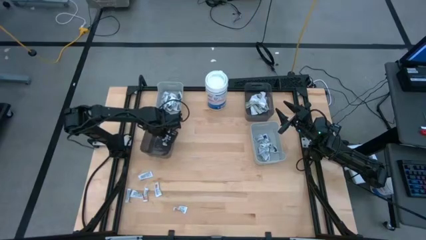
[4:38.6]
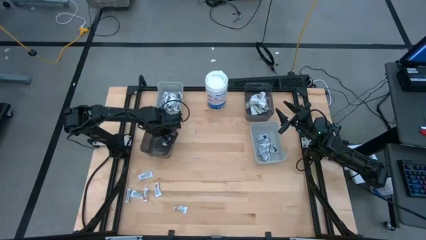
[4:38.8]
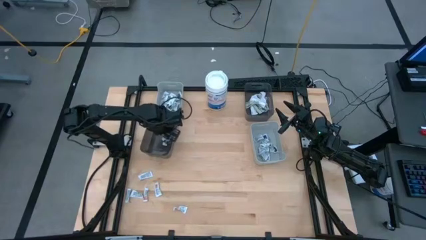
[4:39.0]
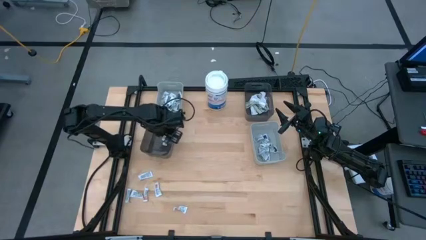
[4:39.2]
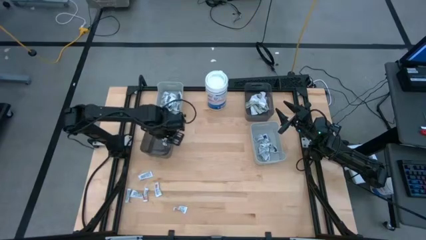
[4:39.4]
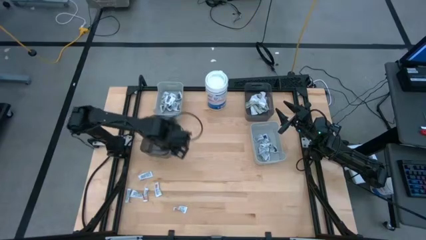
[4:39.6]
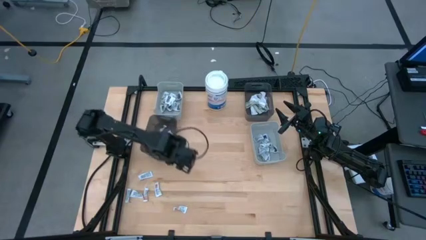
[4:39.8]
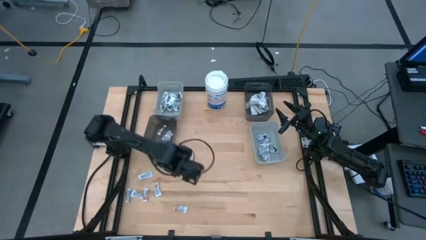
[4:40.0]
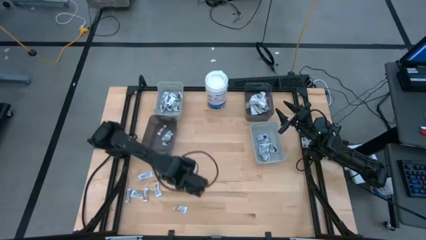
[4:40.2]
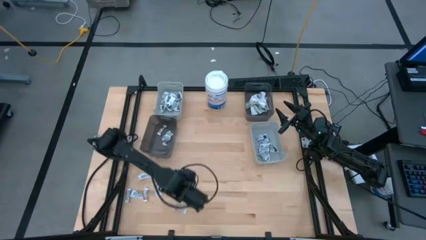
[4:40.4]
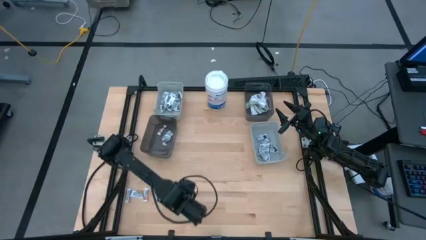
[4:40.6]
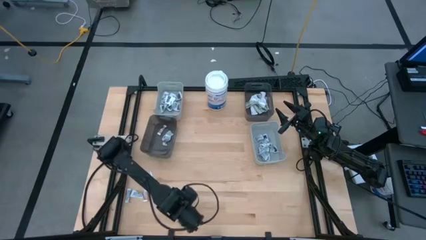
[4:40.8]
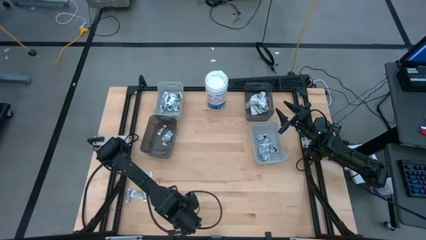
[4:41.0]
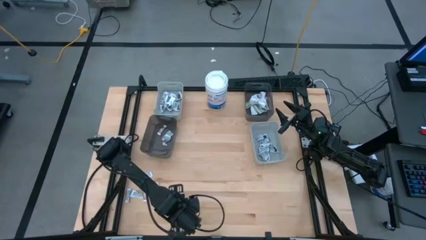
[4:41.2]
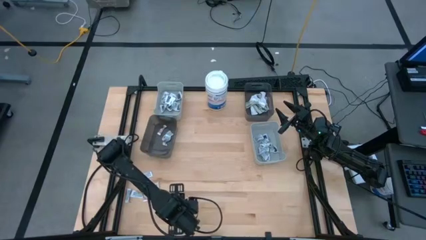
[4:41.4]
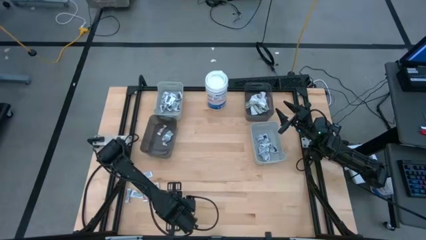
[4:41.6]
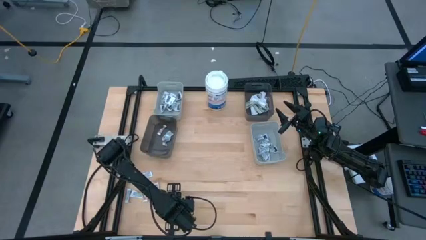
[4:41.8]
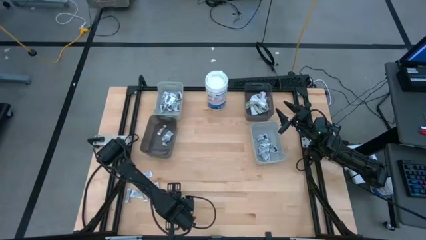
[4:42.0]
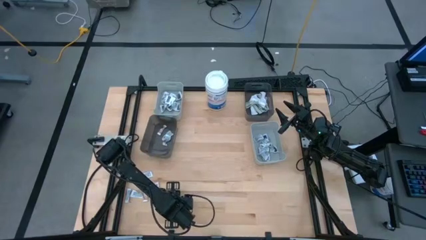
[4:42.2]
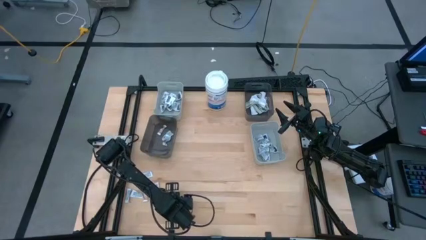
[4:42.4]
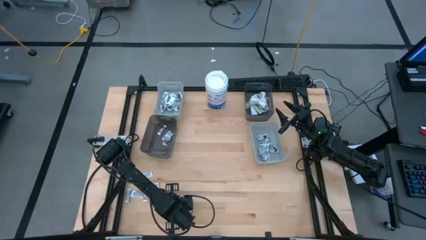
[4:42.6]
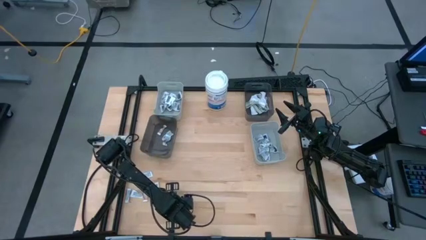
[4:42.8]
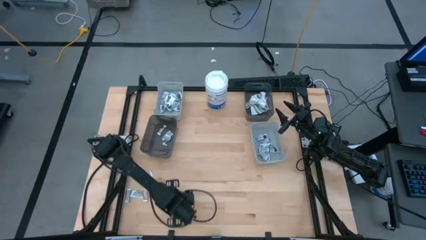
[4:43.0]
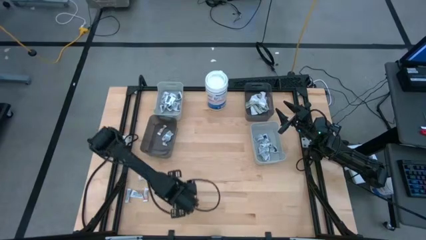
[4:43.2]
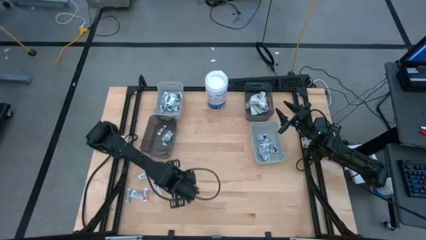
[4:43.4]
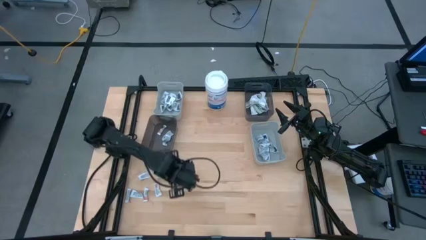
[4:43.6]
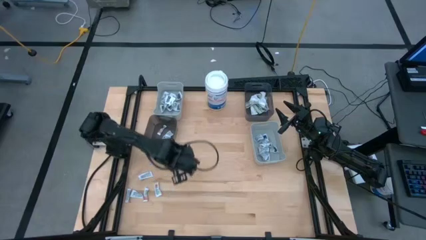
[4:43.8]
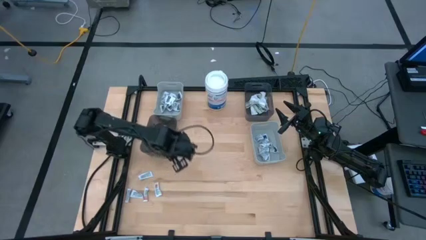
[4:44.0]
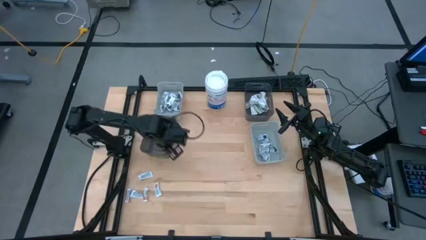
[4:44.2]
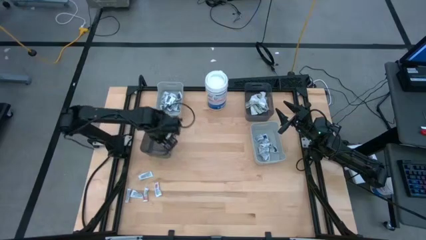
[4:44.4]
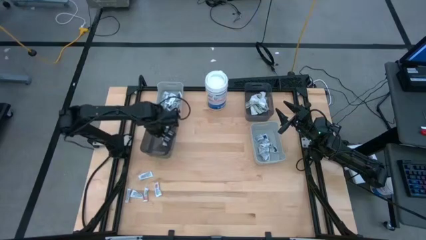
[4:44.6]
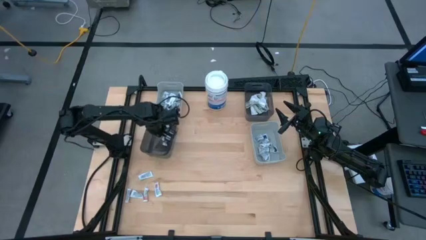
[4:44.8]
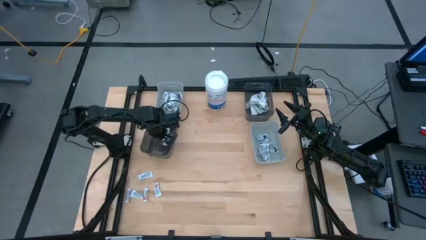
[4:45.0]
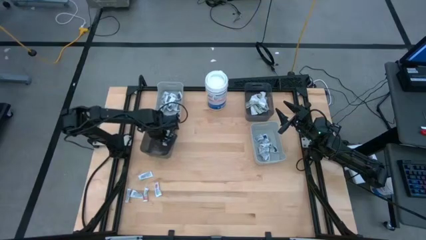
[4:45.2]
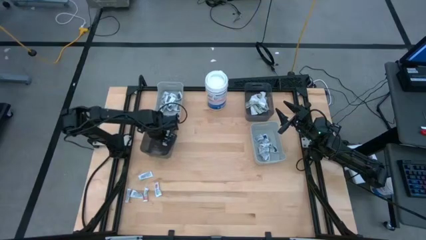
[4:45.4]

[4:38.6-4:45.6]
Task: Pick & Place First Aid Supplies
Put the orange ointment pack into the left black bin

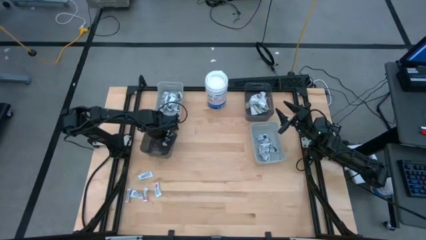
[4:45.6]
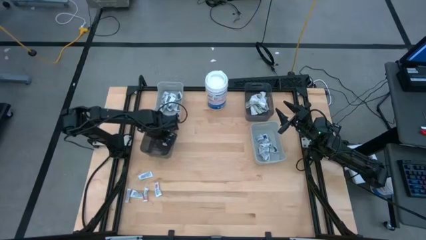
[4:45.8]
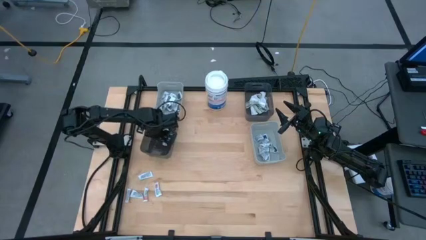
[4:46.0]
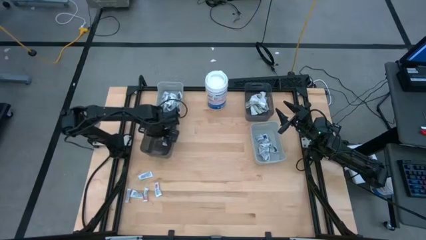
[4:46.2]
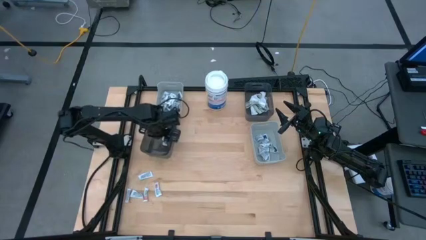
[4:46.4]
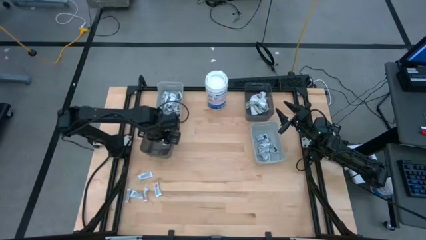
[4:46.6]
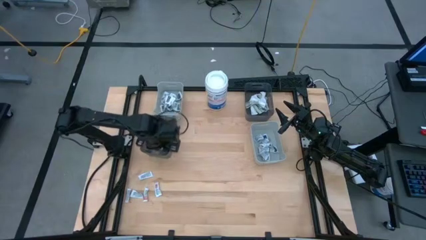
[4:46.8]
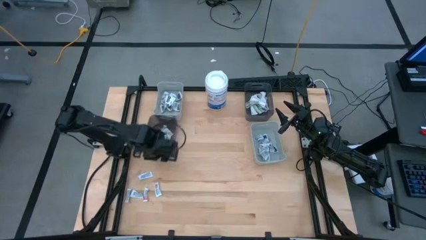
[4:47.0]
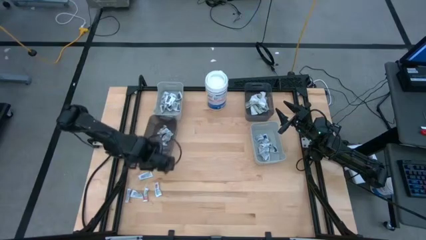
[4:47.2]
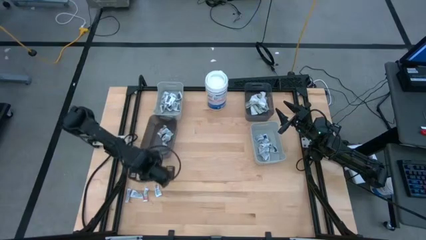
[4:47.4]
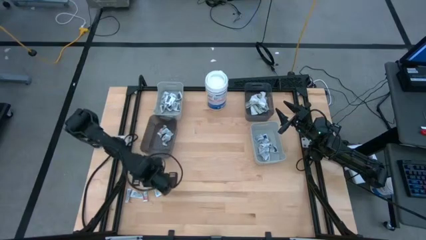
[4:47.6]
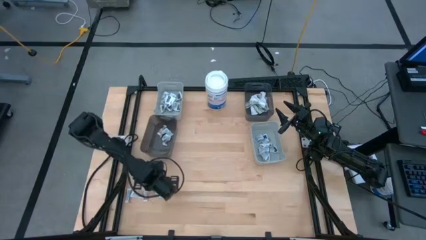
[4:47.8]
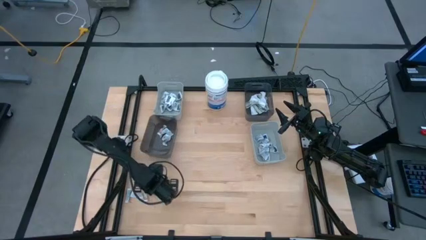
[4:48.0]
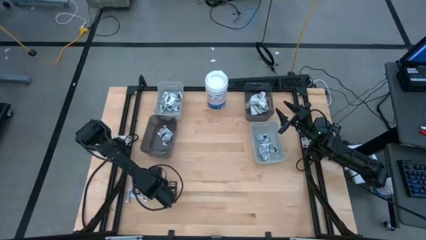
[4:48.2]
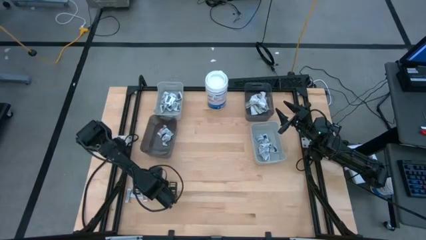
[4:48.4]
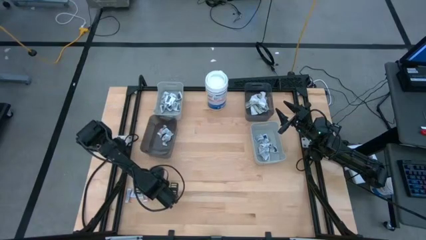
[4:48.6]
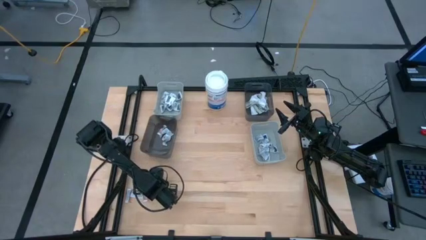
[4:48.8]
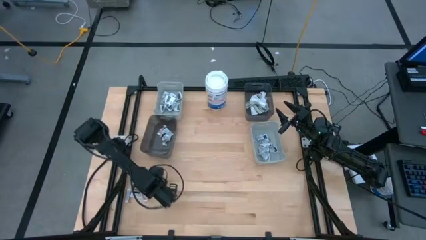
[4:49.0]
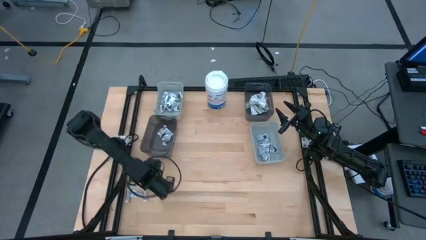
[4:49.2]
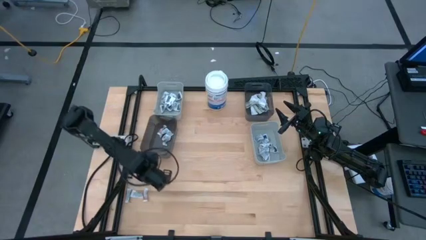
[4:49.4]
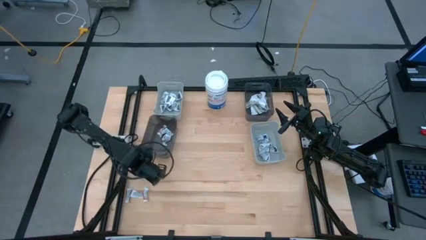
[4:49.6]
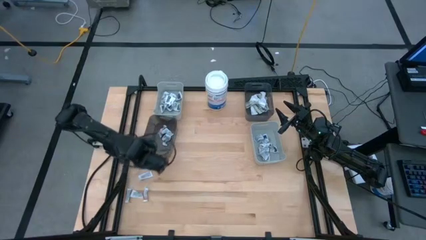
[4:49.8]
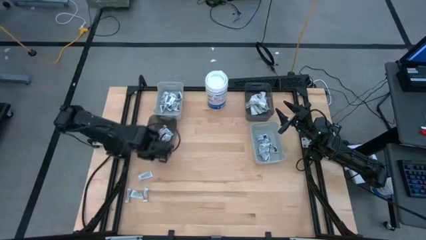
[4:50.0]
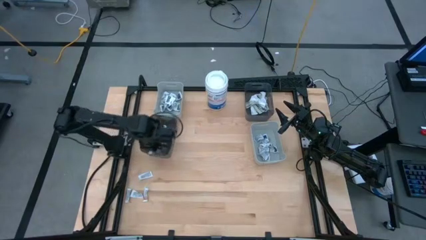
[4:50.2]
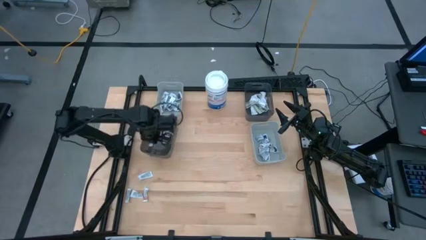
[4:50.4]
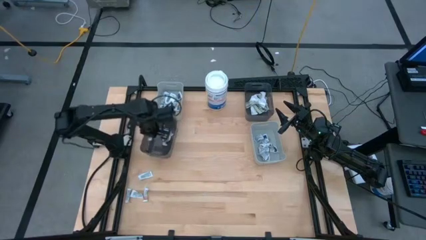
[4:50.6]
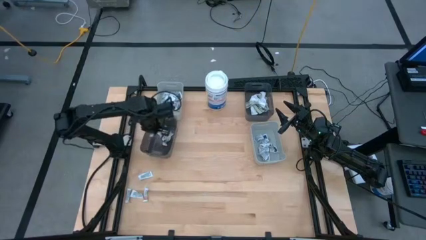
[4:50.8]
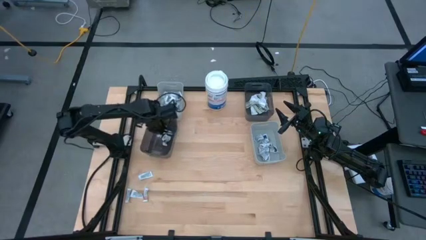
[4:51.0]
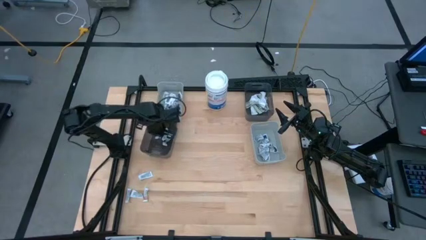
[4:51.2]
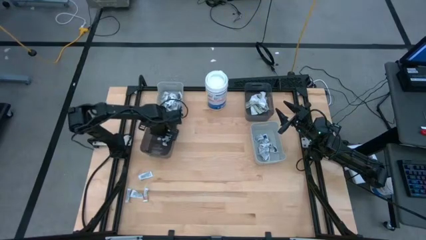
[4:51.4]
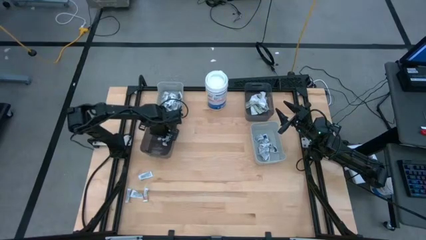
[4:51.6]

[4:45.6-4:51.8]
Put the orange ointment pack into the left black bin

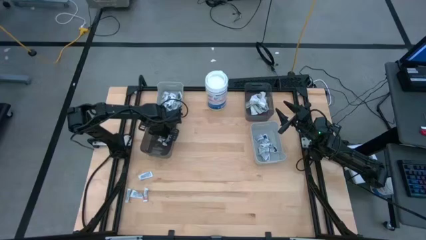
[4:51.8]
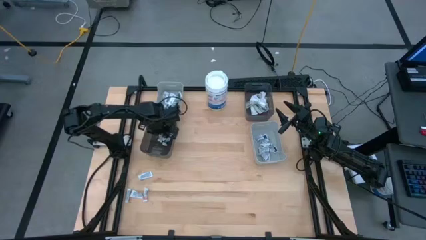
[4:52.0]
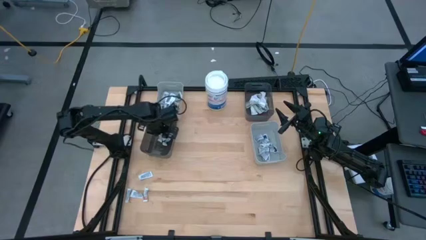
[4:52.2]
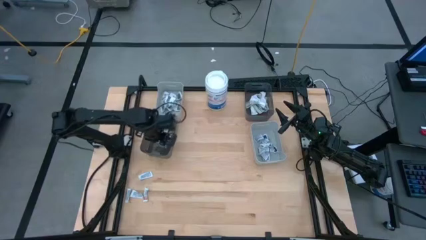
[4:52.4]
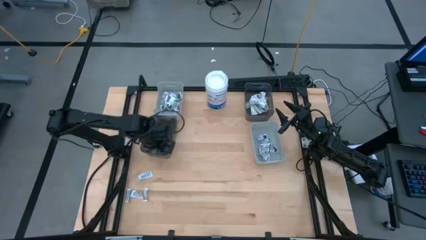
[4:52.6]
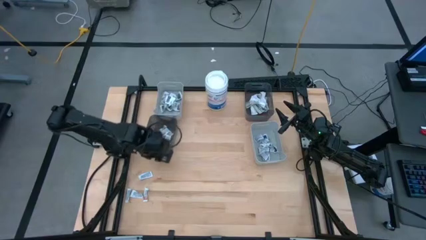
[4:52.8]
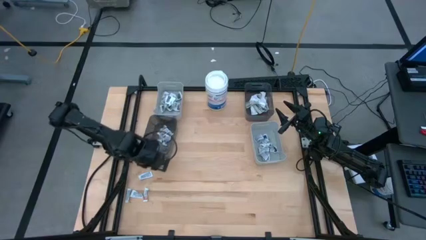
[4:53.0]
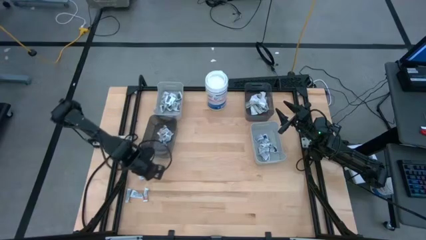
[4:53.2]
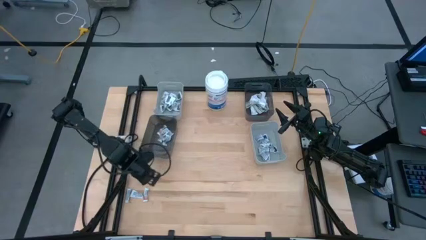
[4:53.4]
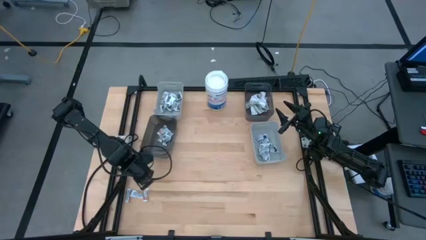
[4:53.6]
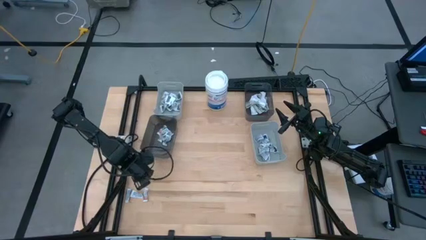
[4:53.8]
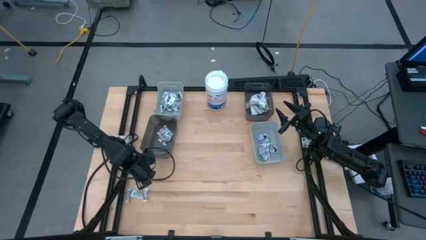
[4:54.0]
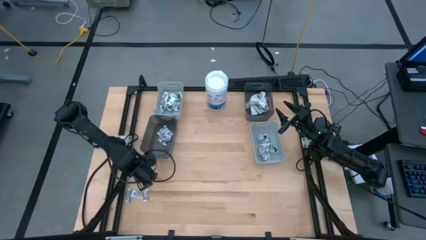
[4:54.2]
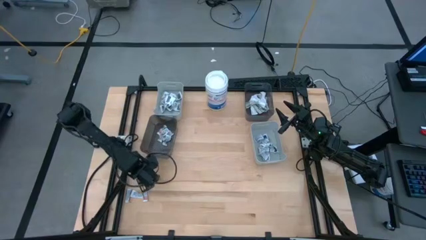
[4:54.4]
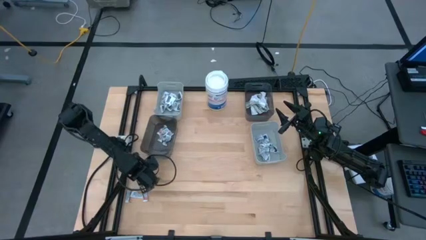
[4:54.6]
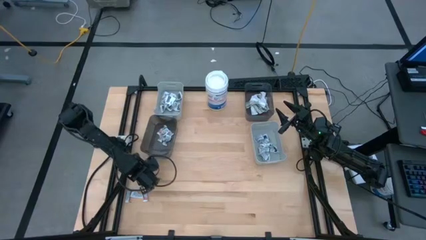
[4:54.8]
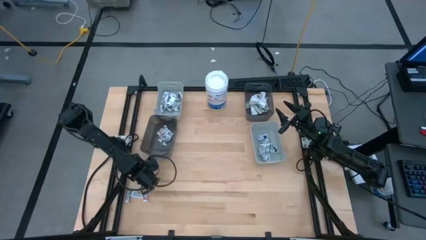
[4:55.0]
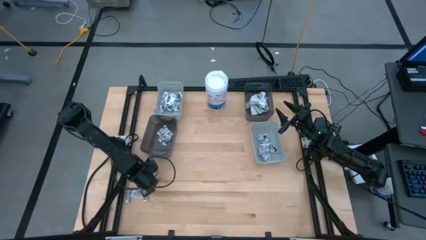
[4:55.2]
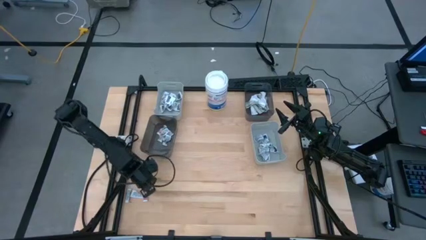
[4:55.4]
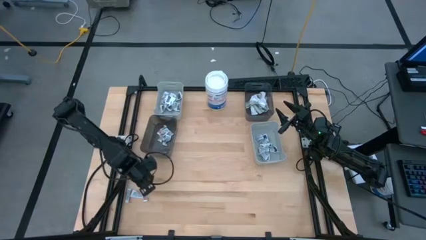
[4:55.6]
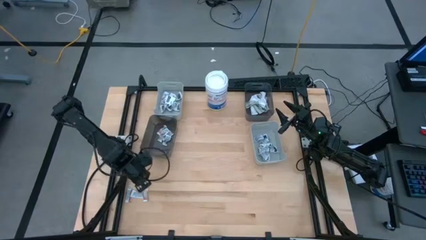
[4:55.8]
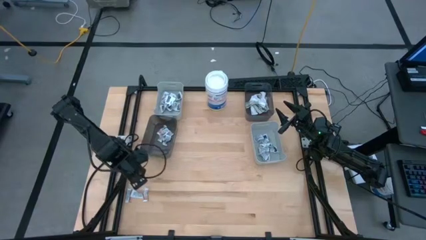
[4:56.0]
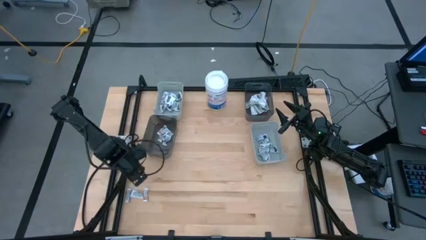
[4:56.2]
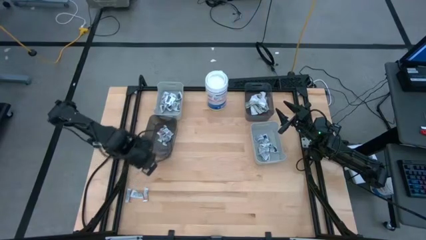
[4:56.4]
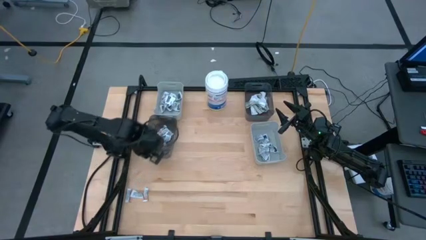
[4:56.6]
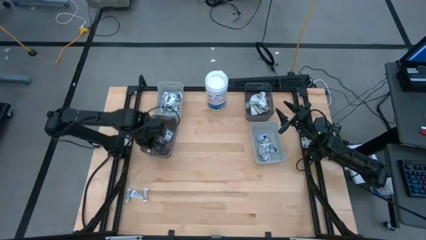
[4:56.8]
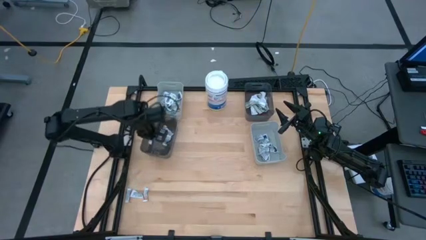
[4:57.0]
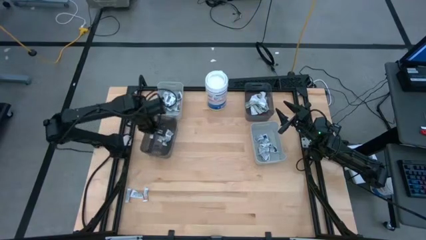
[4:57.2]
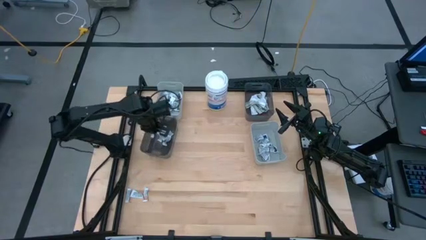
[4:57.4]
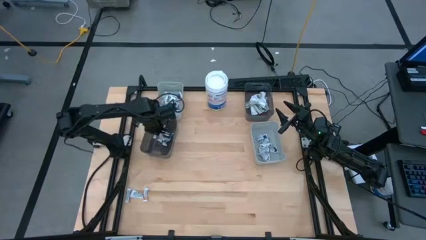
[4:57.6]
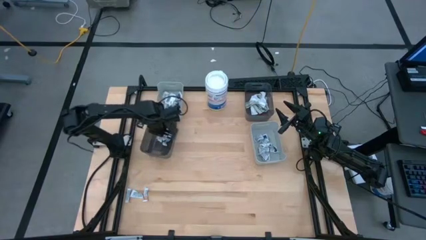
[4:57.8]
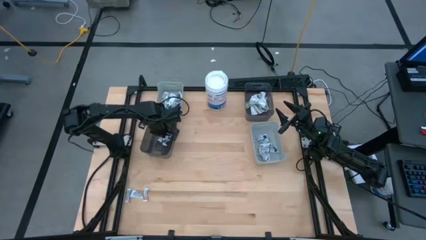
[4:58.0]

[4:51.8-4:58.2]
Put the orange ointment pack into the left black bin
